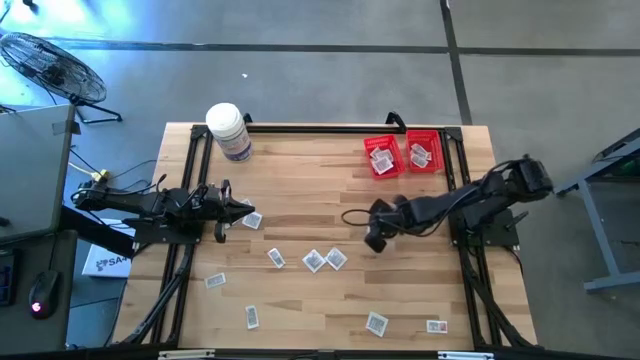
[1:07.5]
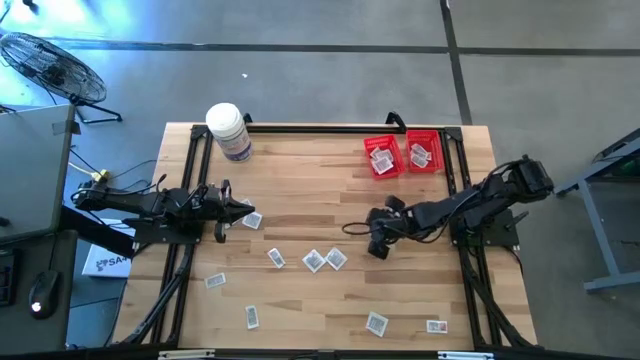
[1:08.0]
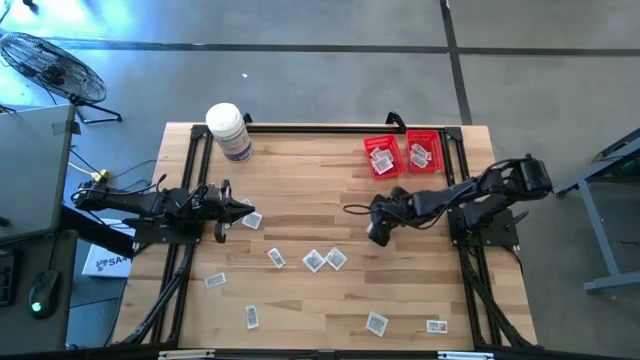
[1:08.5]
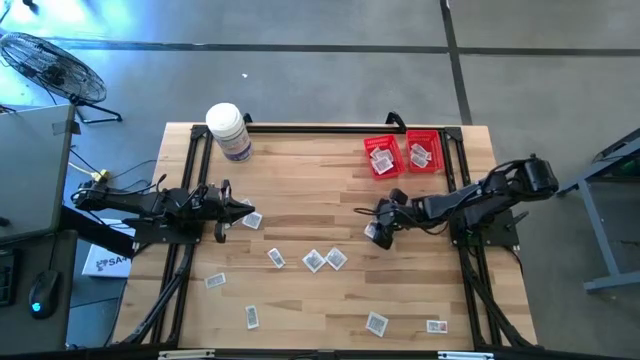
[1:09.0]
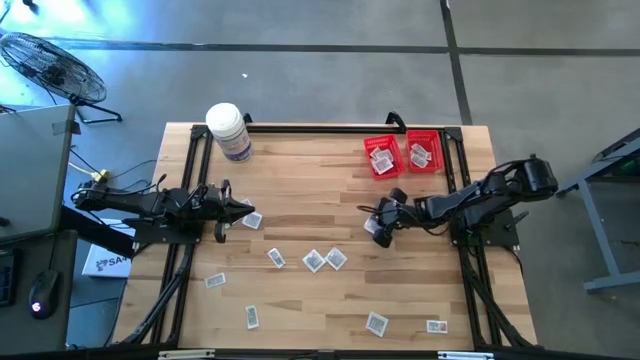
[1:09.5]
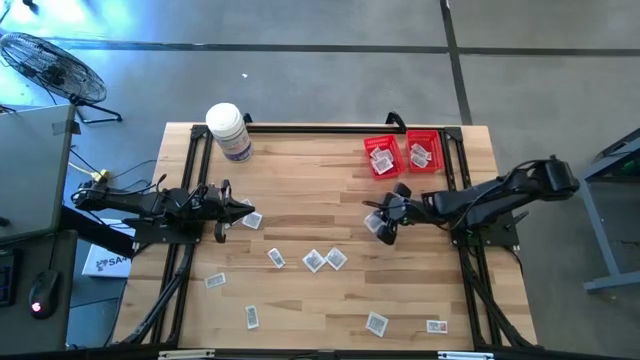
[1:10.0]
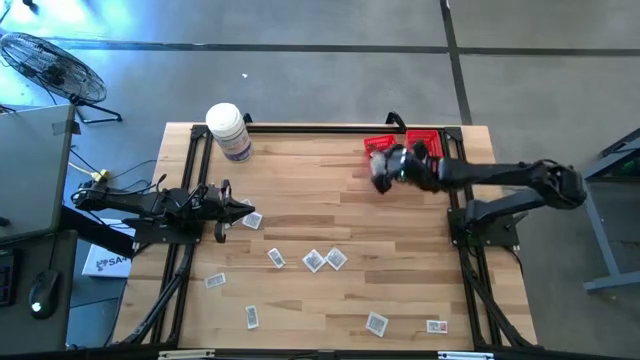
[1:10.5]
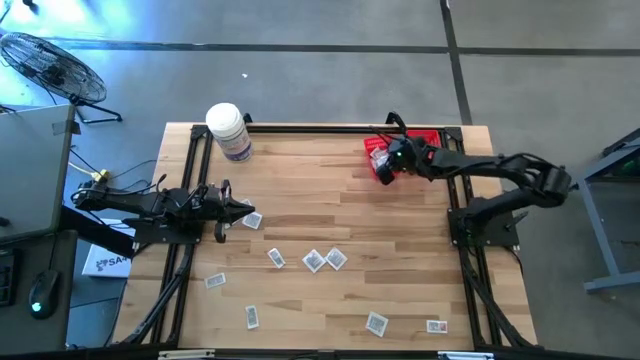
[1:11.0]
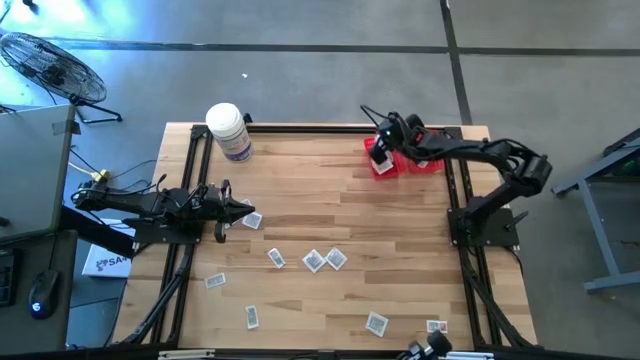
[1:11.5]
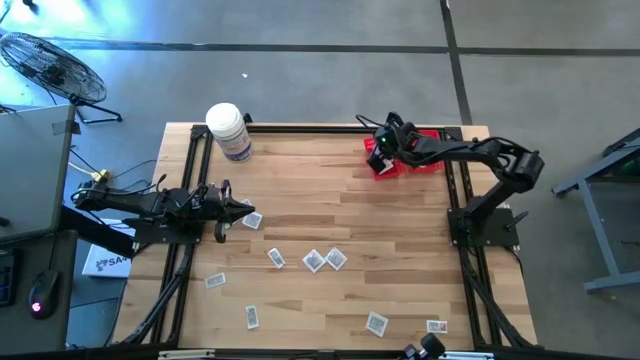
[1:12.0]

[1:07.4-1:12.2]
Task: Pick & Place First Aid Supplies
Put the towelette pack into the left red bin

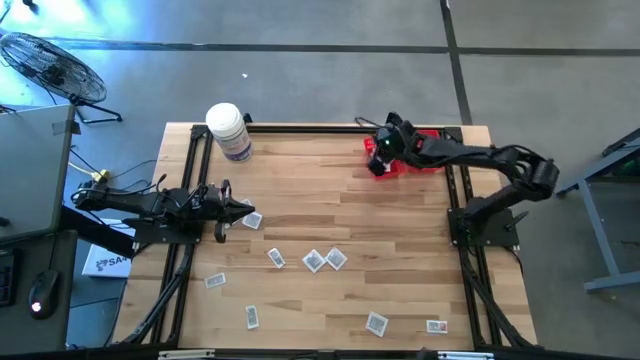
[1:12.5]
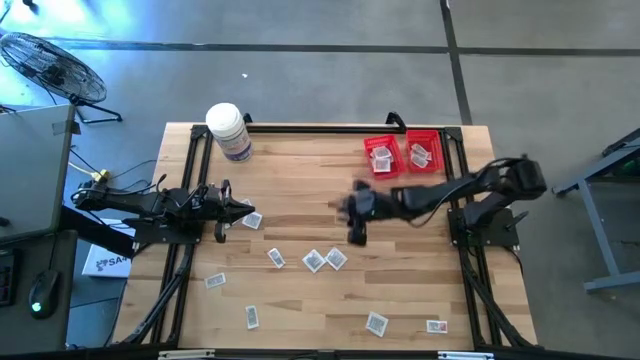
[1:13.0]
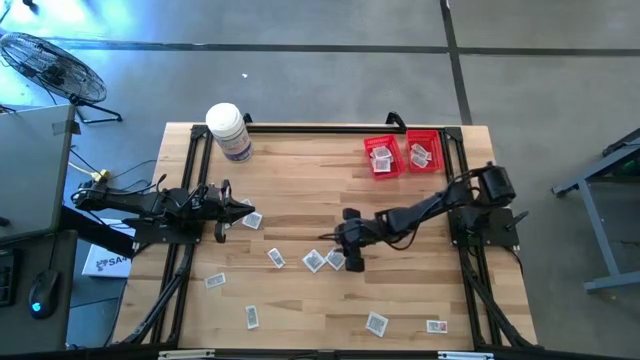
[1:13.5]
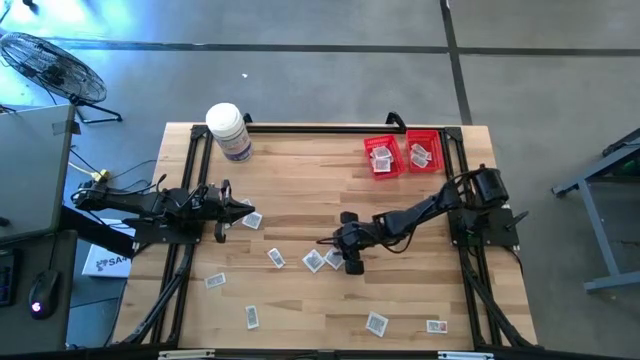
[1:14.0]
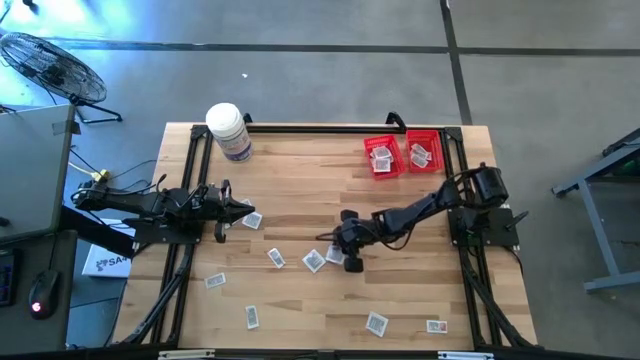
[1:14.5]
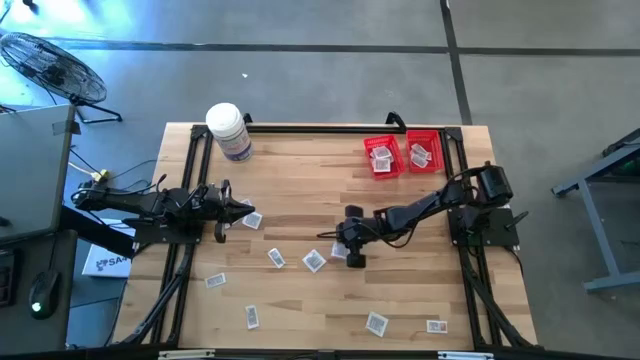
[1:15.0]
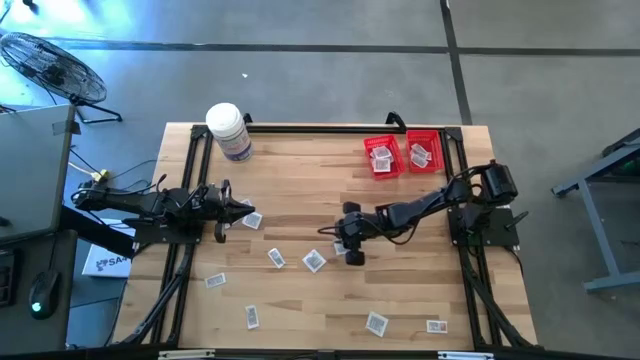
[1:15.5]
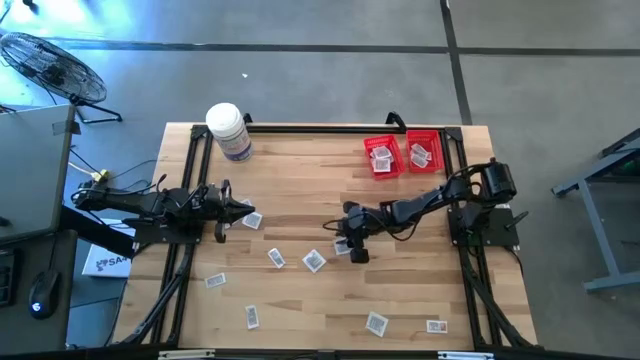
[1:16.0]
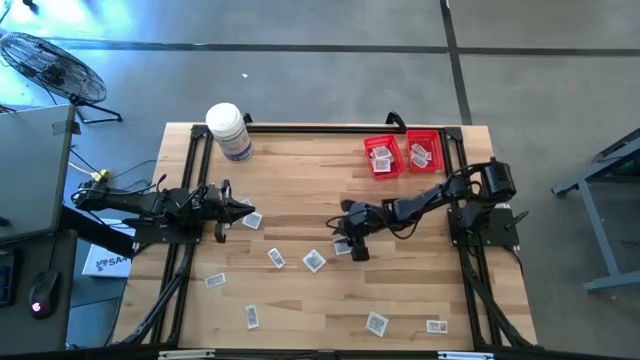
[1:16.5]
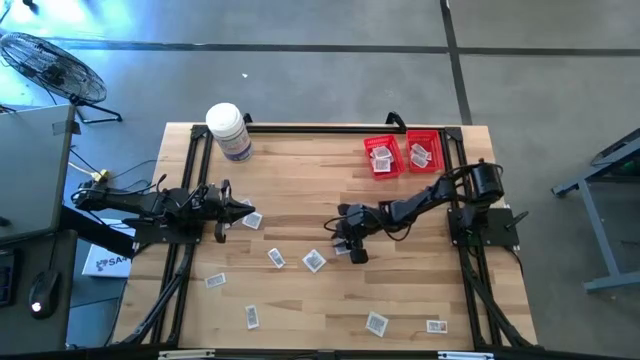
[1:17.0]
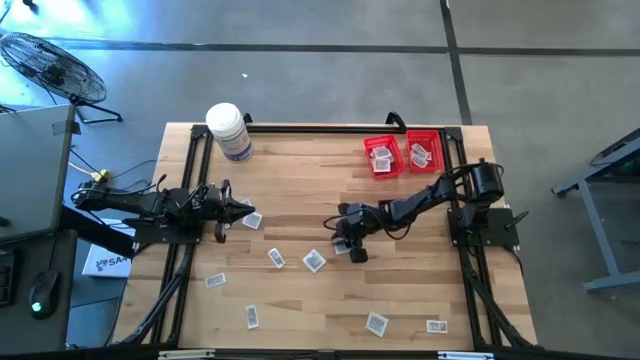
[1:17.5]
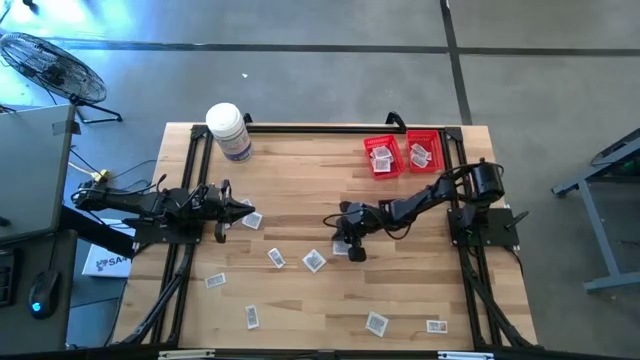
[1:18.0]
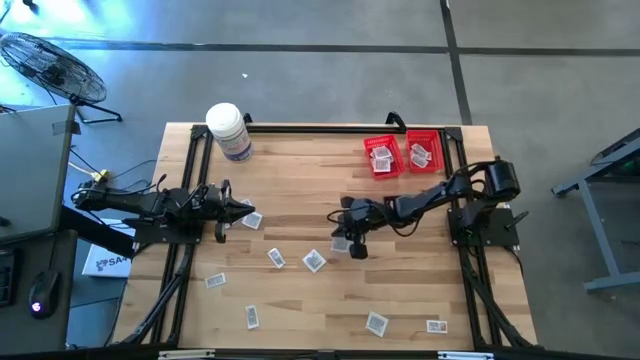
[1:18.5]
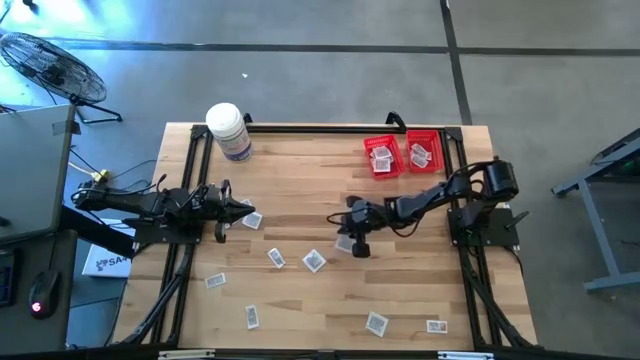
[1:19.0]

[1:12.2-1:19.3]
Put the towelette pack into the left red bin

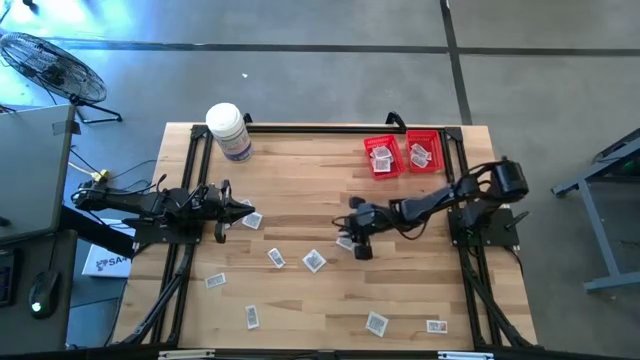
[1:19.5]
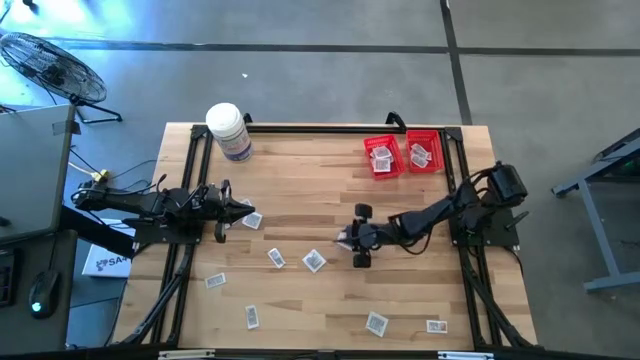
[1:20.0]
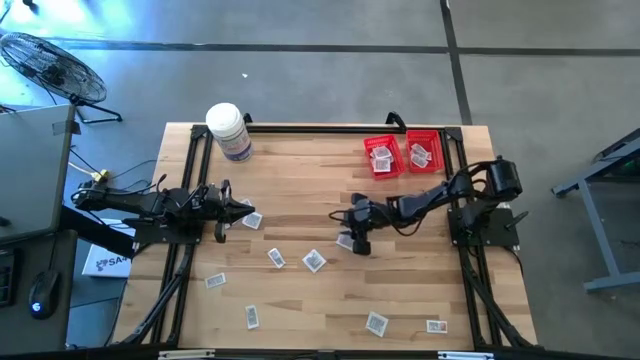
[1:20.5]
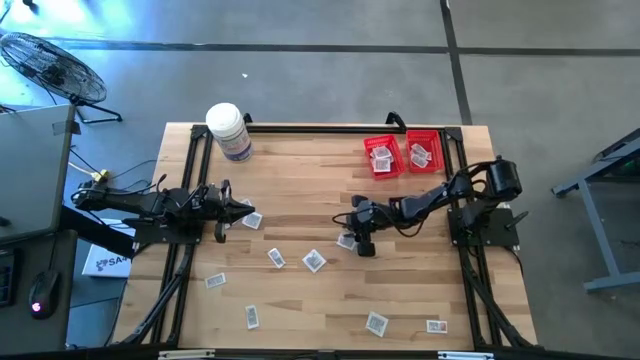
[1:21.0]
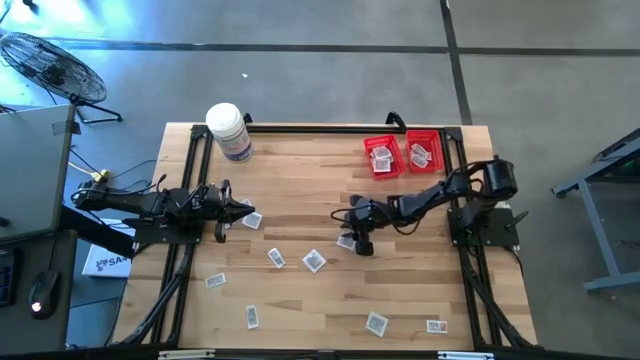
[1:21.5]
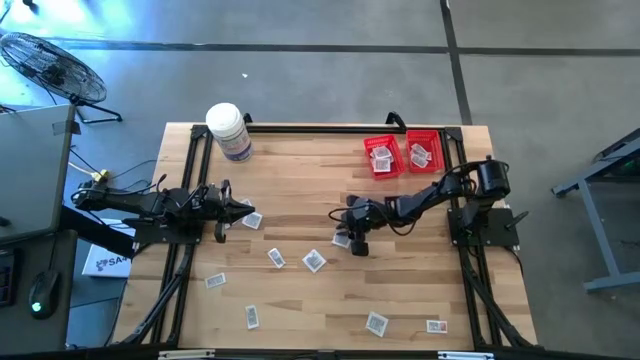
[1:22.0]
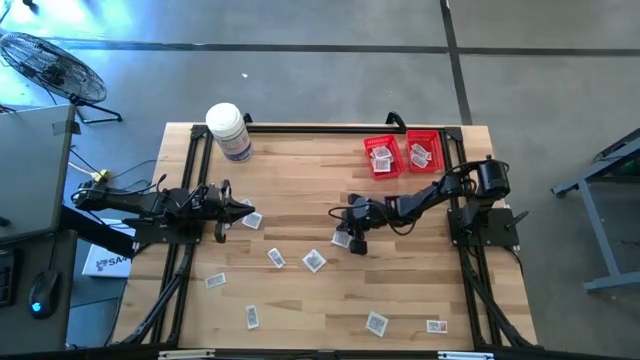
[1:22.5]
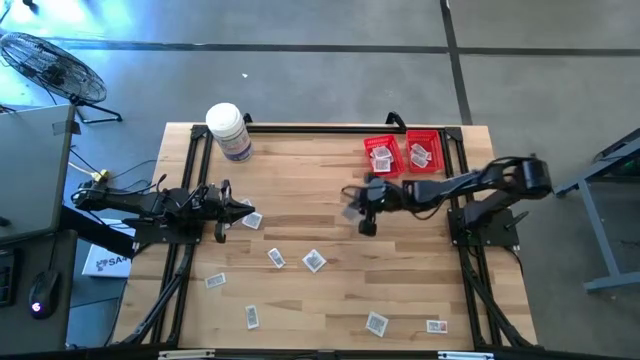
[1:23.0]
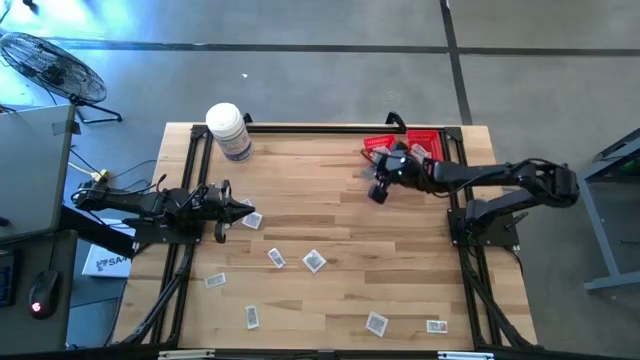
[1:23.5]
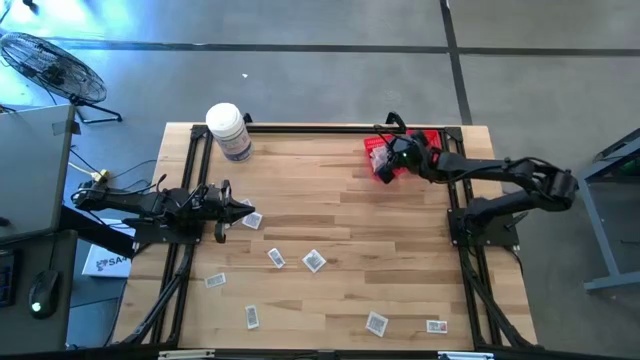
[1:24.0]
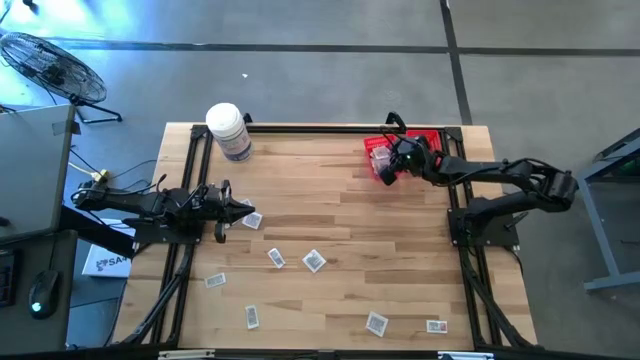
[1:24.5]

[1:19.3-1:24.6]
Put the towelette pack into the left red bin

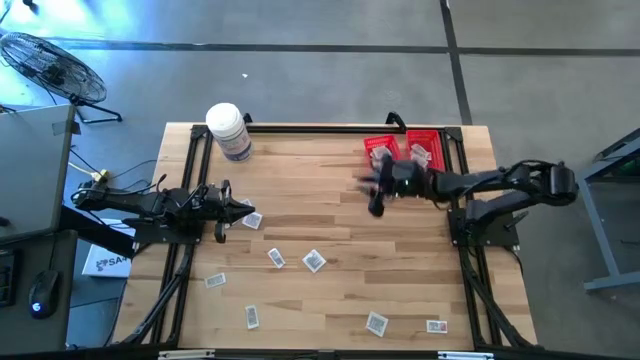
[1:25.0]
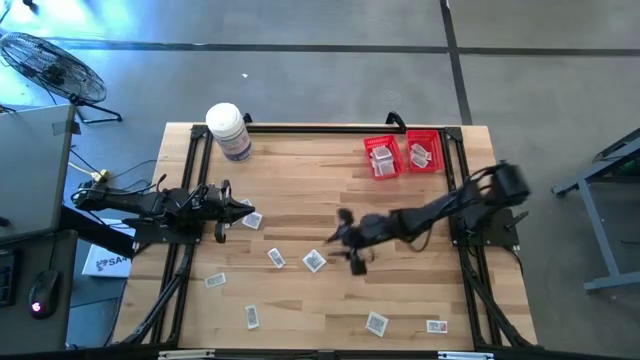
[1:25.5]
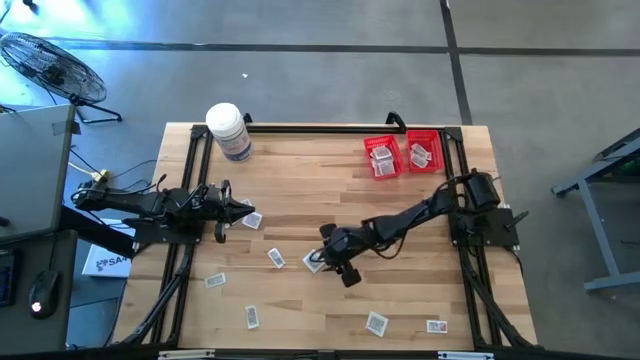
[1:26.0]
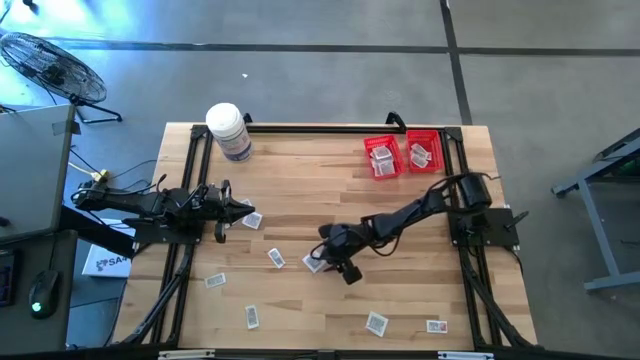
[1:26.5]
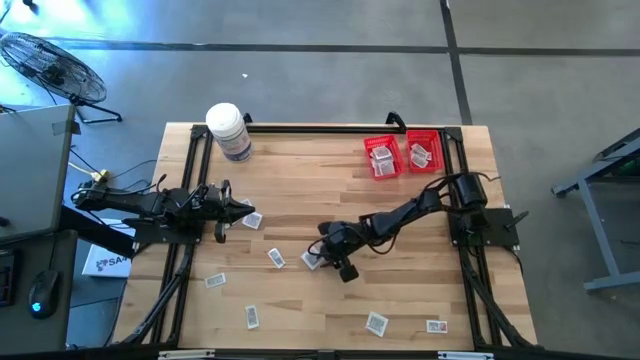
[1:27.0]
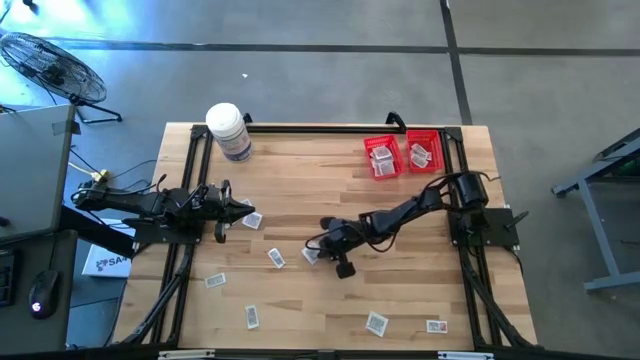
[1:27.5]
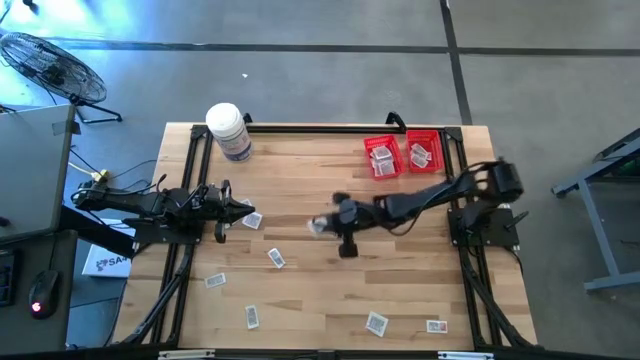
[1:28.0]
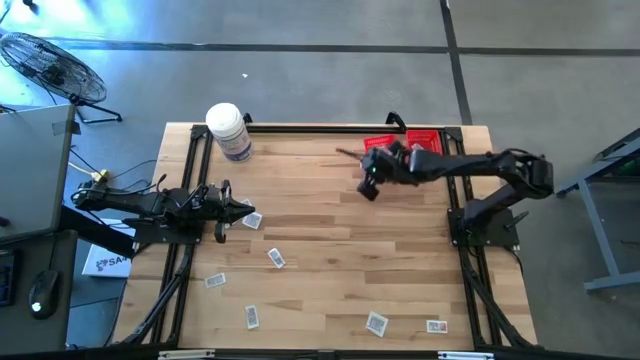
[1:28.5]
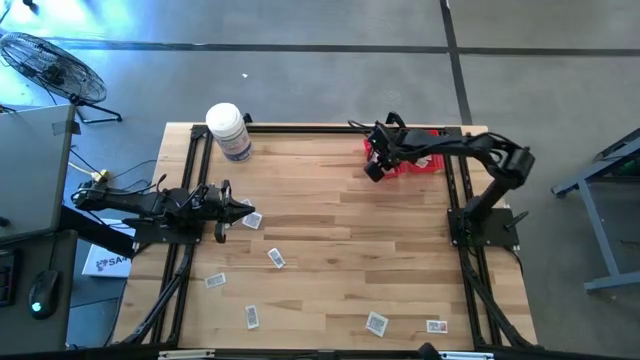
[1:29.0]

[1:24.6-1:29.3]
Put the towelette pack into the left red bin
